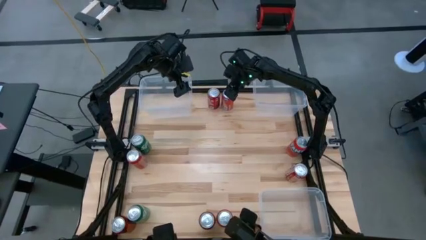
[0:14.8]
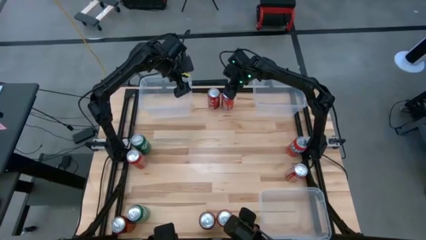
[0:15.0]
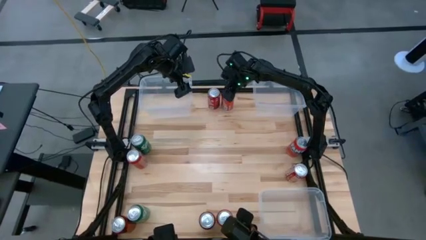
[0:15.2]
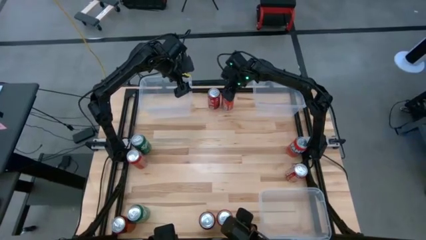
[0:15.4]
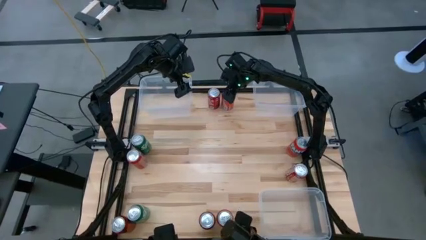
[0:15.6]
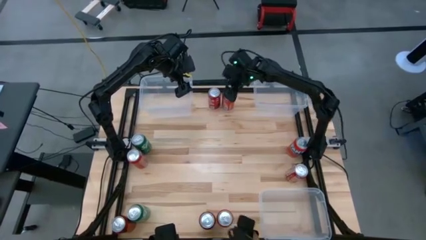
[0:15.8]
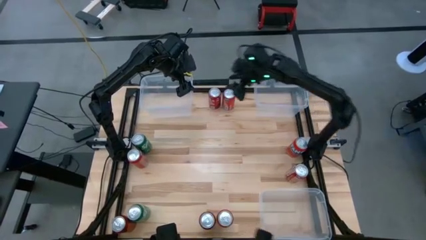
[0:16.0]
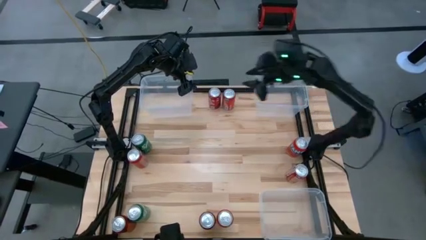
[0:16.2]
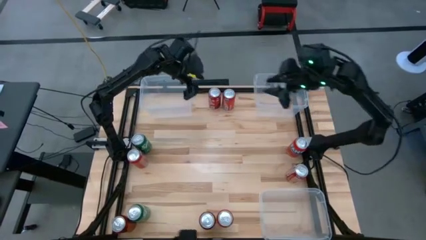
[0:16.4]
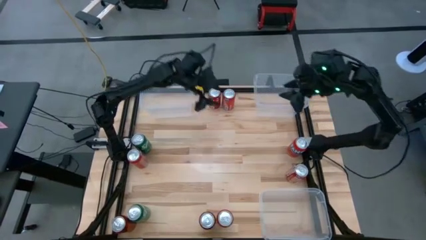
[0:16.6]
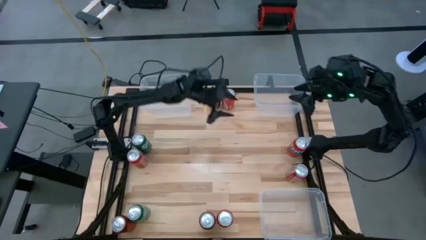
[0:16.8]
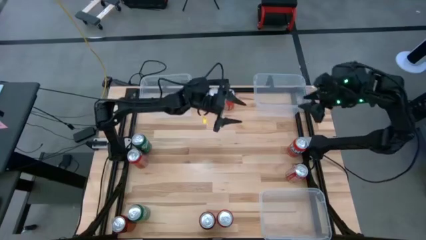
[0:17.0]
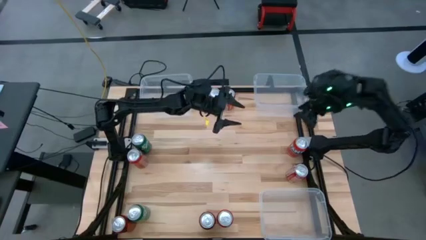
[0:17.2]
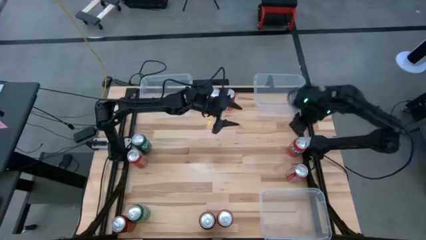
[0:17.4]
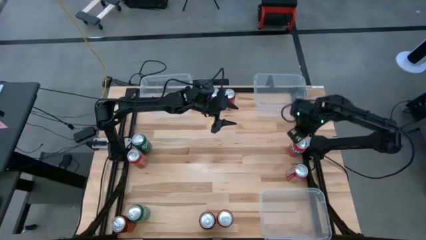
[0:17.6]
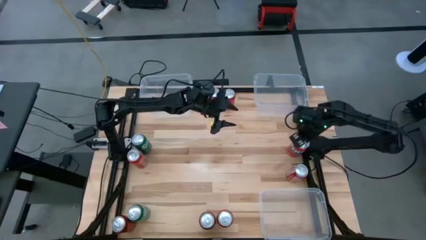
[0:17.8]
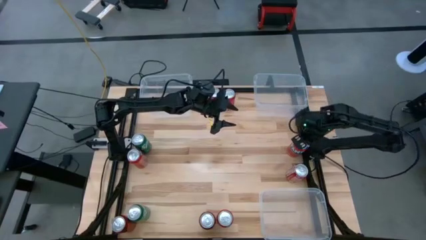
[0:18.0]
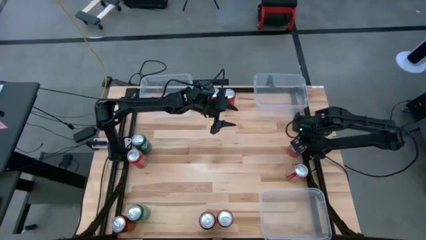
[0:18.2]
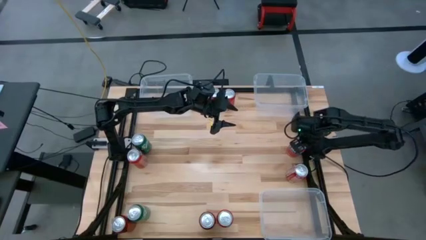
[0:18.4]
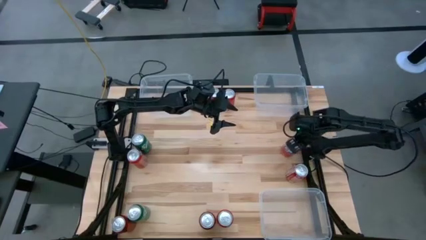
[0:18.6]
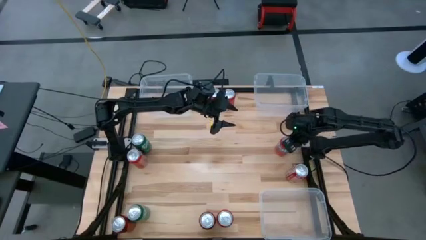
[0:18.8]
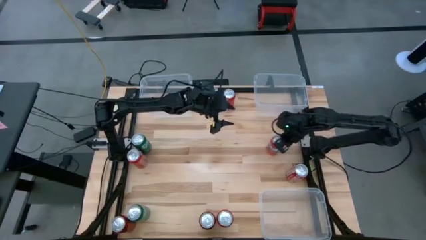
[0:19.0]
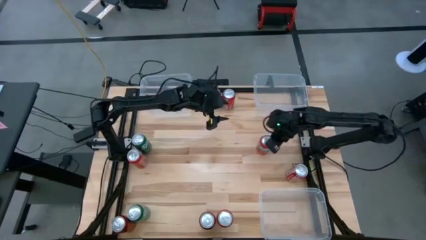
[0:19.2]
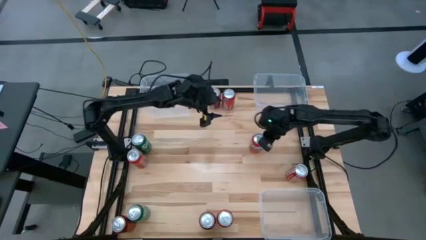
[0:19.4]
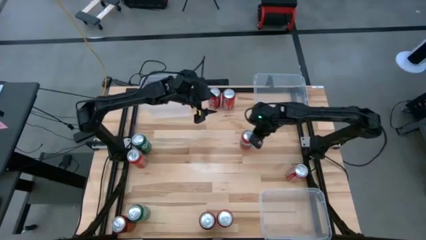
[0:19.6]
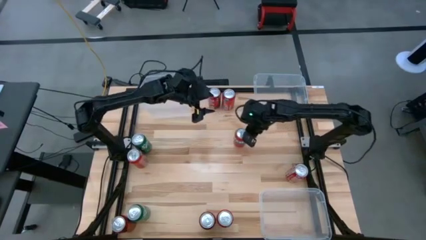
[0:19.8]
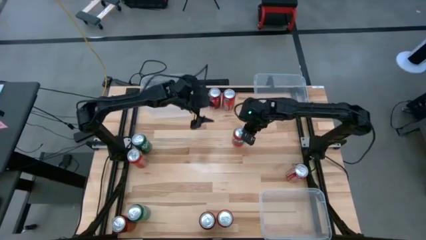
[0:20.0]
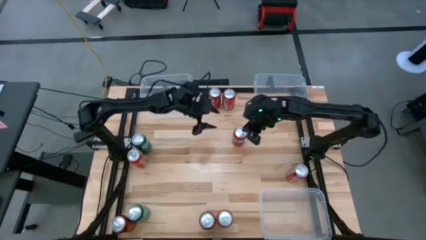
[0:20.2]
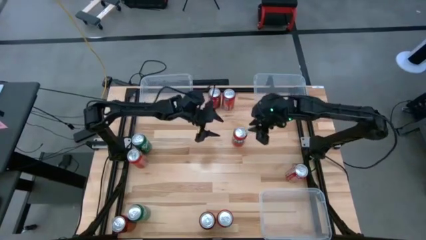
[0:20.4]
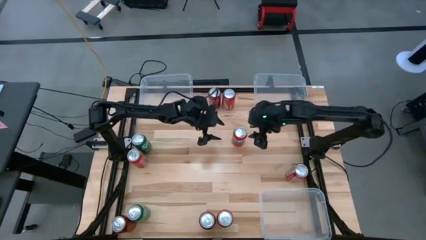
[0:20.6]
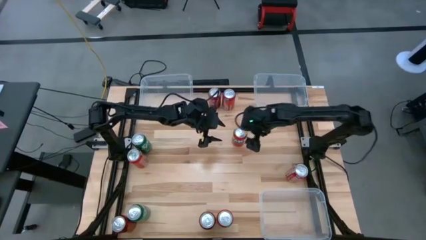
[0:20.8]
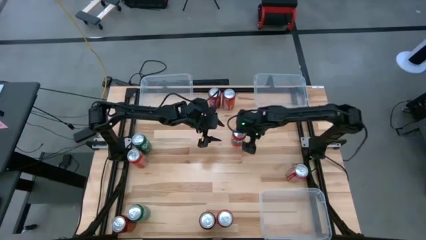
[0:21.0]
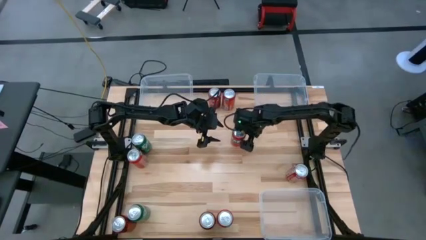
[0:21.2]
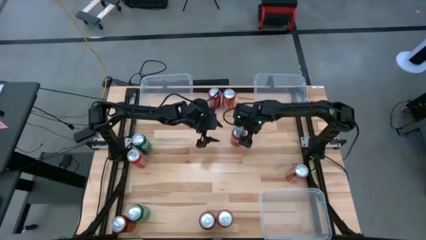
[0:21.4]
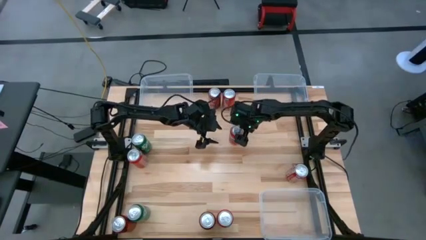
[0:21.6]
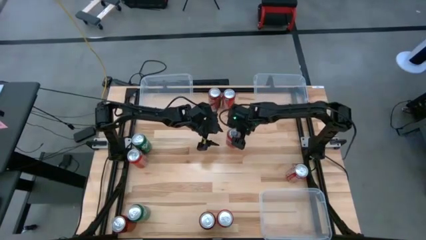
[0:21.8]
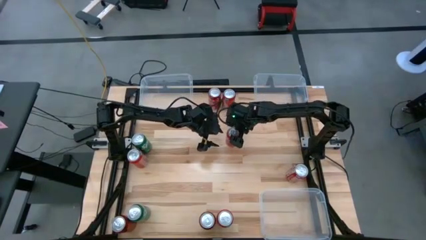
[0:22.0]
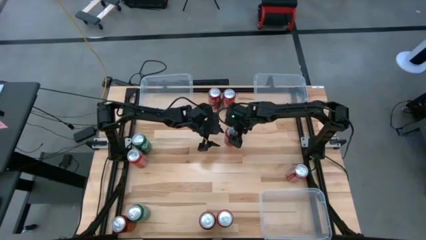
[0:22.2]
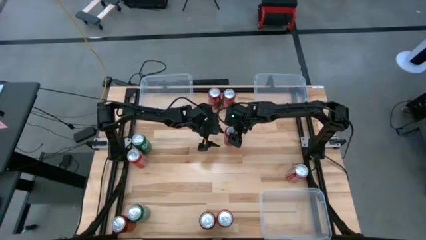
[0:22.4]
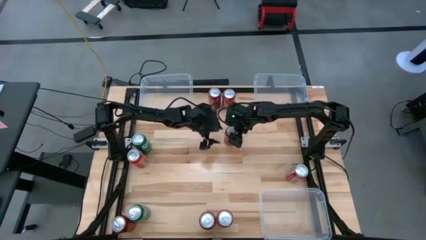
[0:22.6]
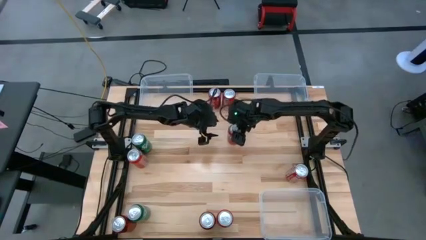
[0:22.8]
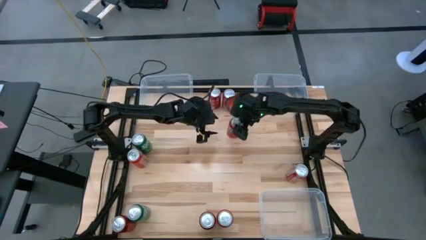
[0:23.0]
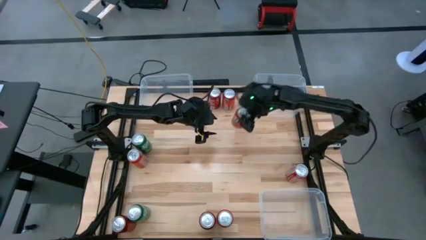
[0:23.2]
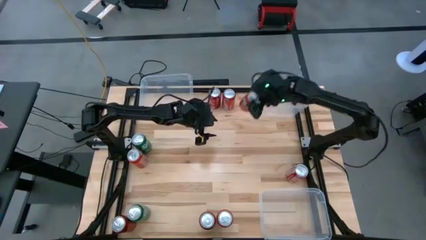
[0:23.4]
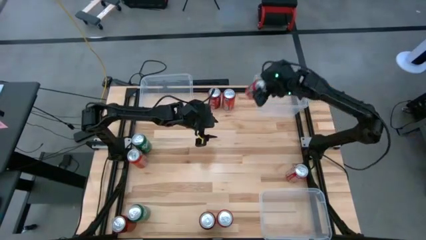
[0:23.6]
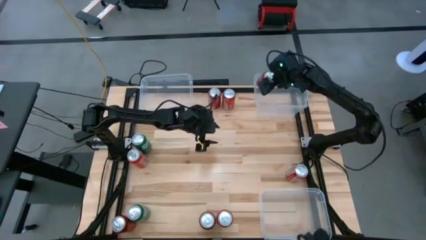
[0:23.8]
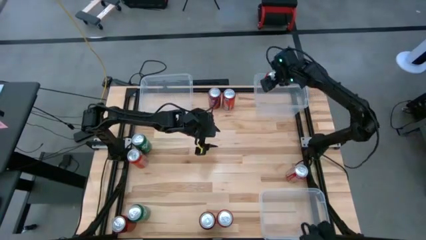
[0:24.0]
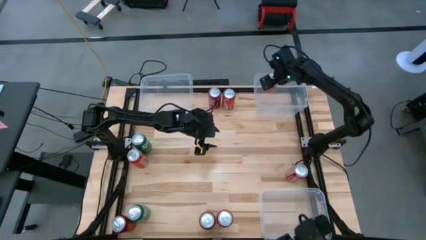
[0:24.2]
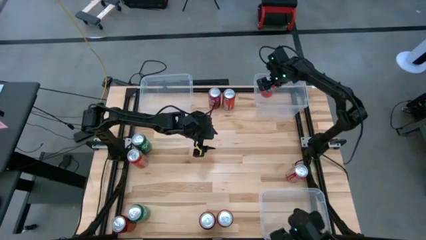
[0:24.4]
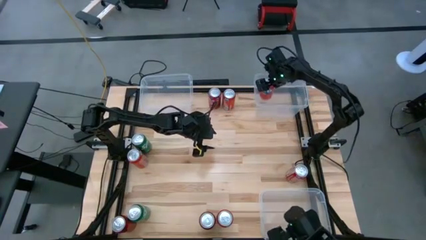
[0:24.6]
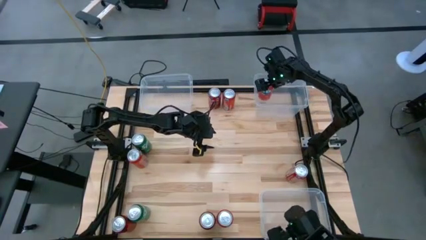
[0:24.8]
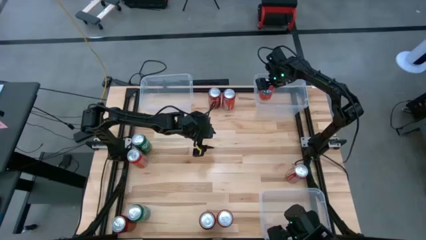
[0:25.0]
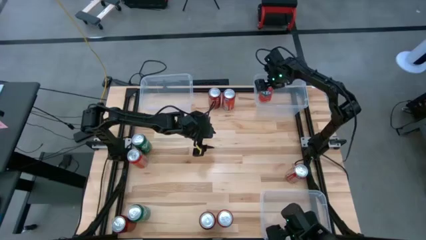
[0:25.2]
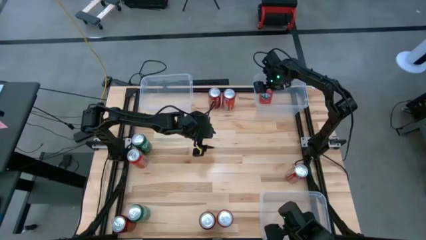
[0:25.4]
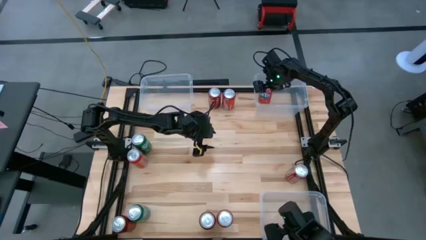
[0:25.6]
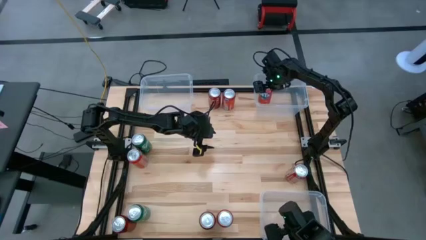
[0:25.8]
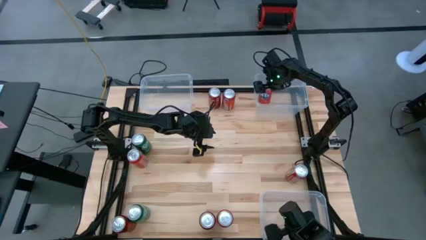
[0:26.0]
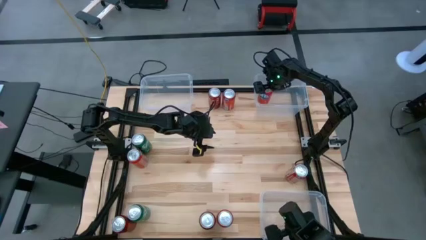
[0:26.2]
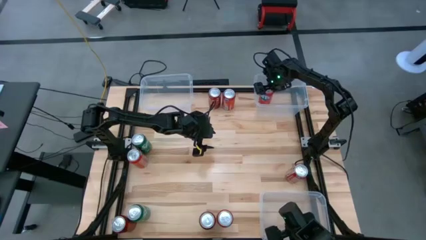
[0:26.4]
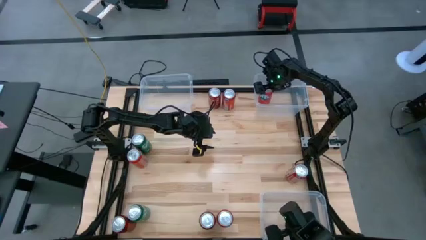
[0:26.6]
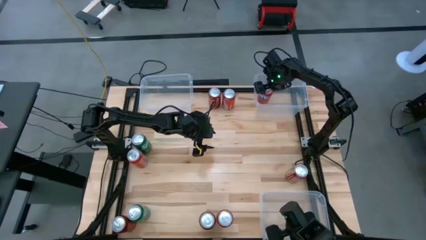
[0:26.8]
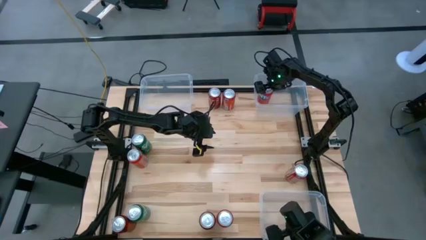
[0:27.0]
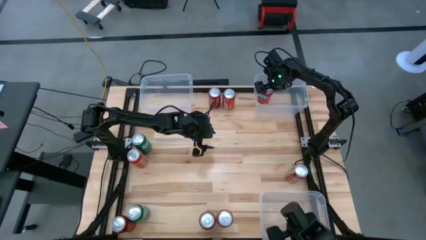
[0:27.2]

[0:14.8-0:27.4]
Task: Sort soda cans
Put the middle right red soda can into the top right transparent bin
